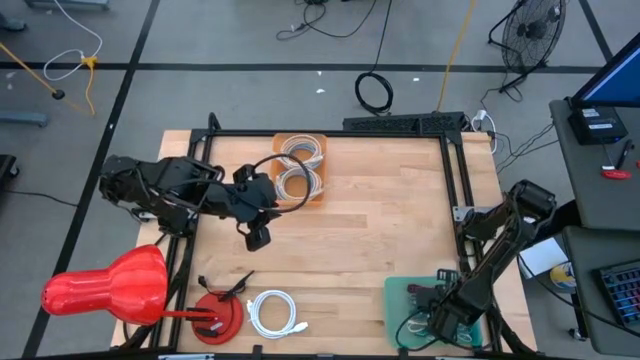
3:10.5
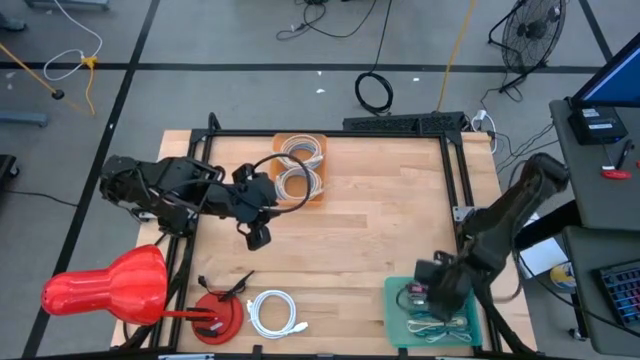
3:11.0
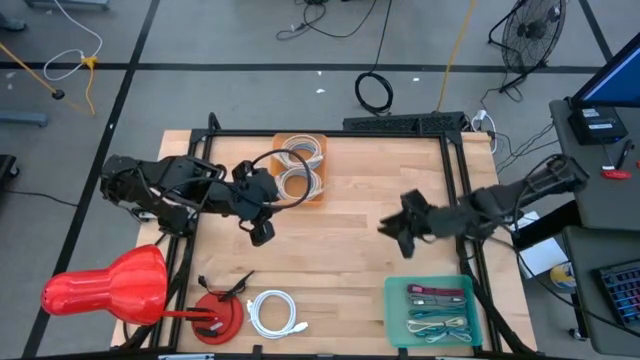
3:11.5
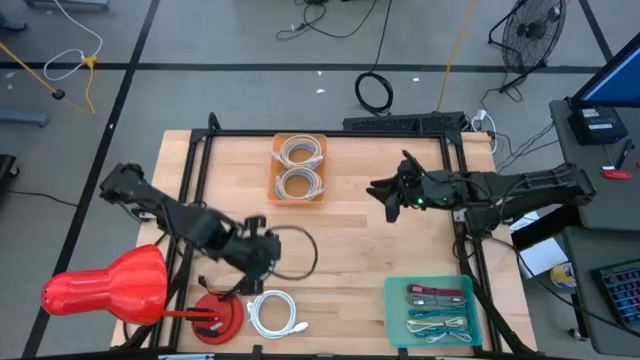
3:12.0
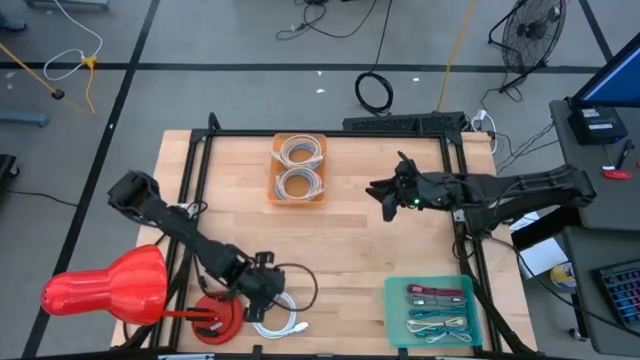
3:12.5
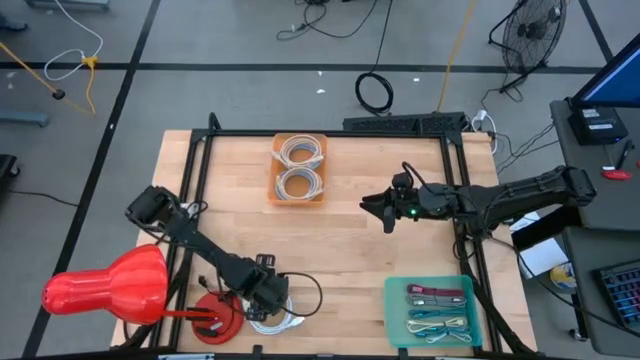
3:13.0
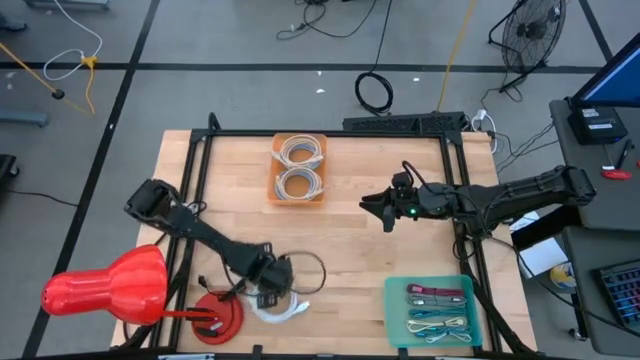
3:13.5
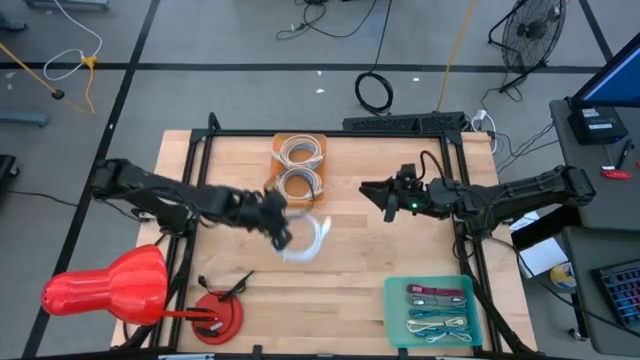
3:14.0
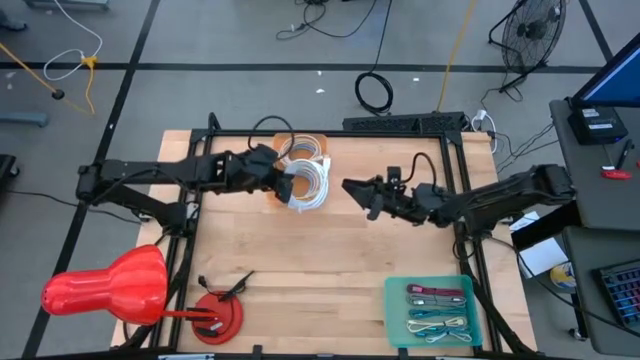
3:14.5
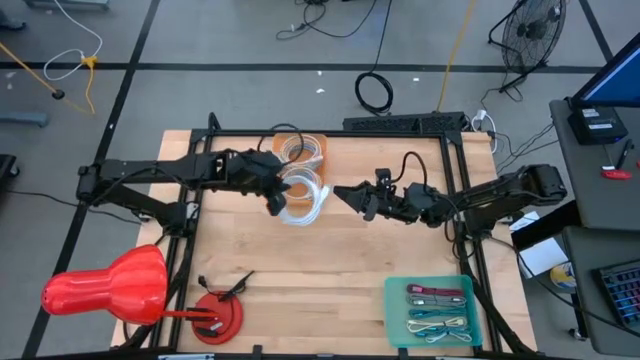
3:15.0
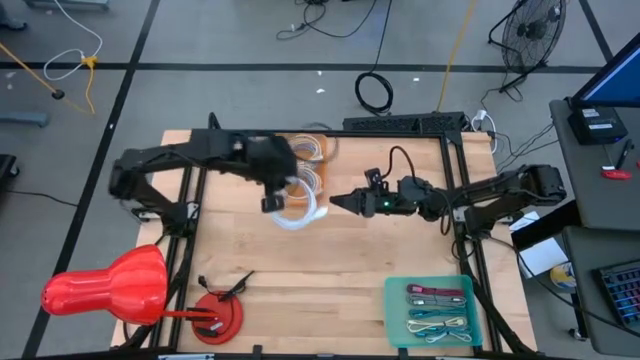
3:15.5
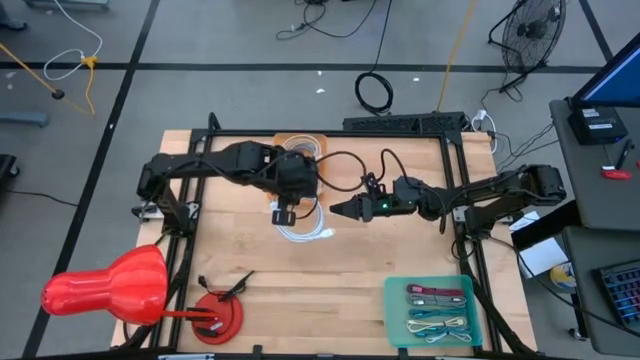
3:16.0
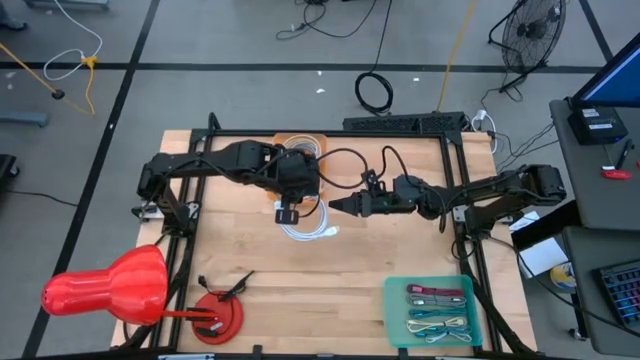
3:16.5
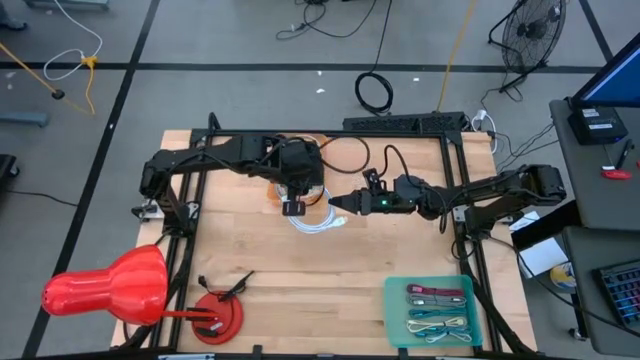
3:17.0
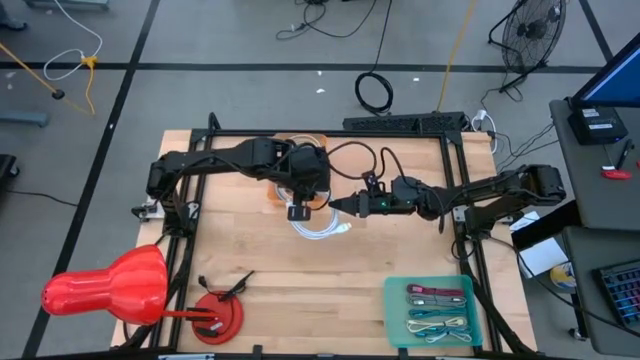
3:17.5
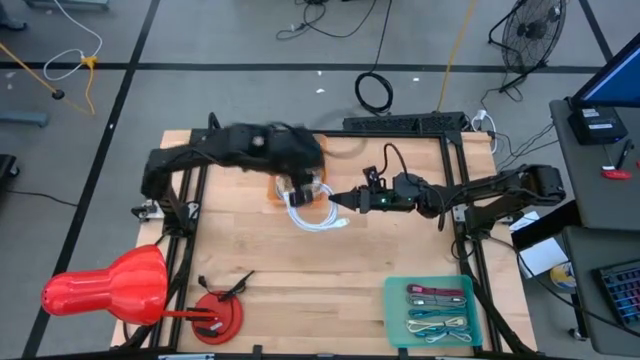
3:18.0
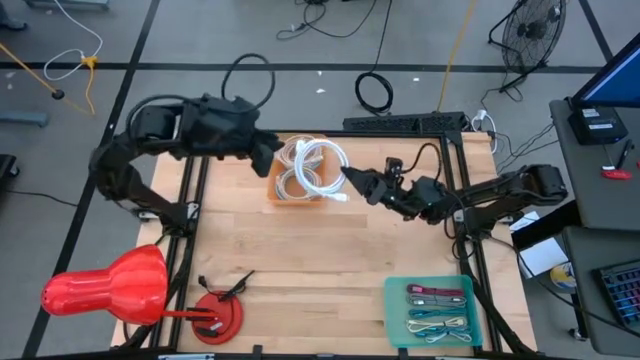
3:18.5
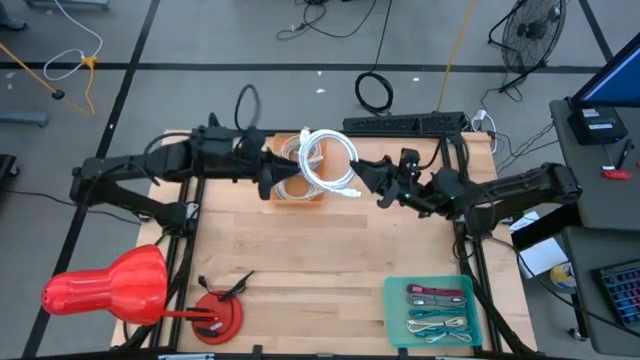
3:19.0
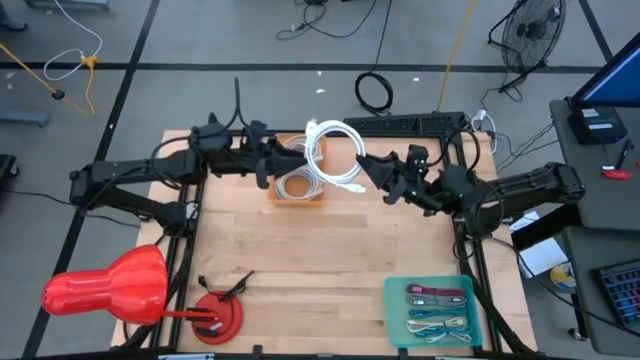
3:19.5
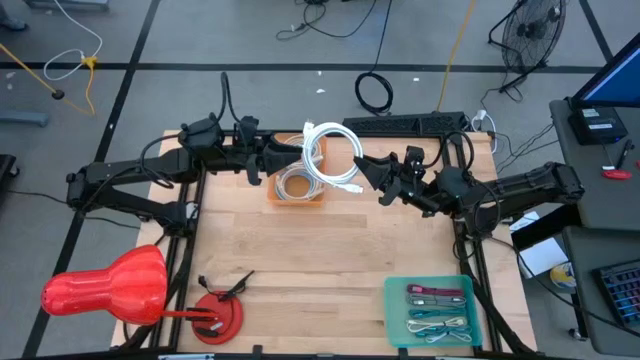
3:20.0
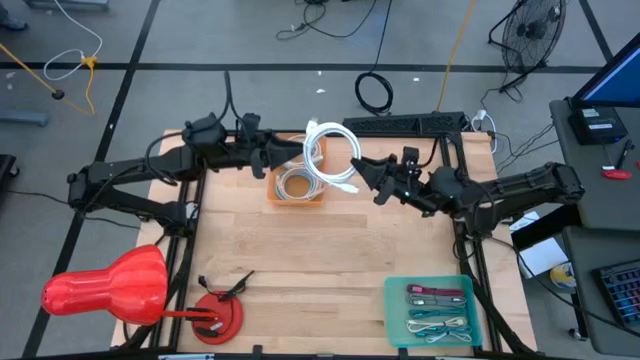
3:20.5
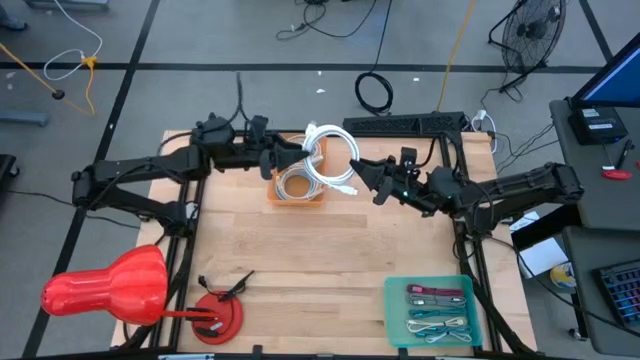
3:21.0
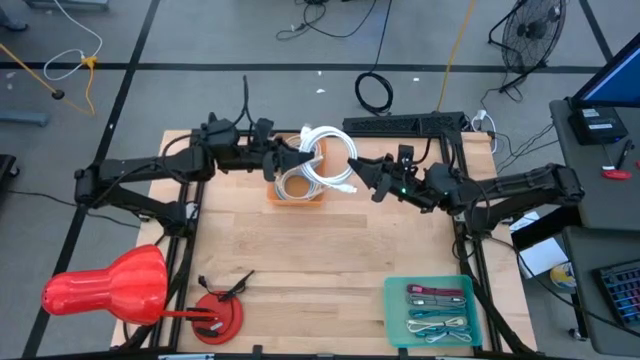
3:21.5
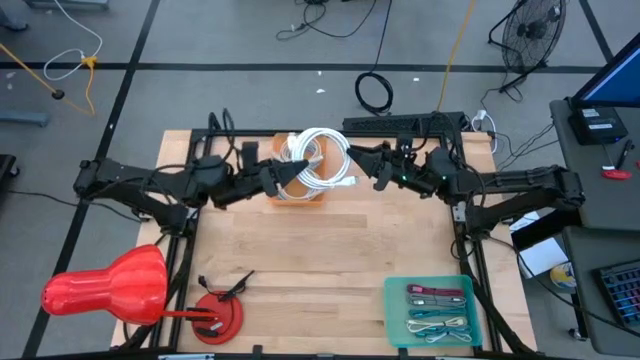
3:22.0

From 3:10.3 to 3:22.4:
Task: Pick & Place USB Port
Put the white usb cable into the orange bin

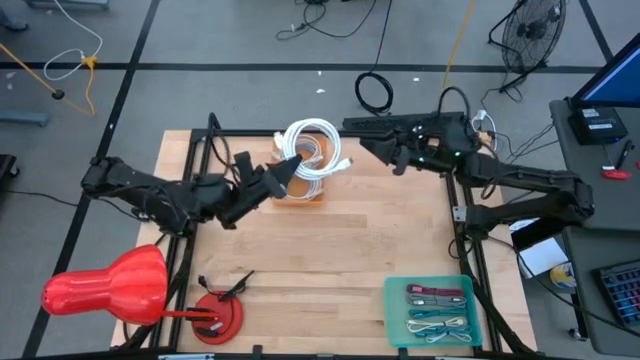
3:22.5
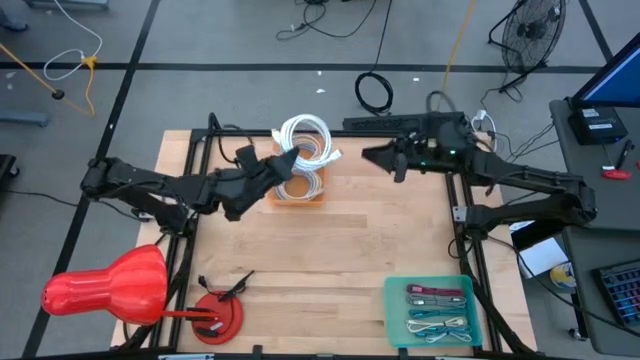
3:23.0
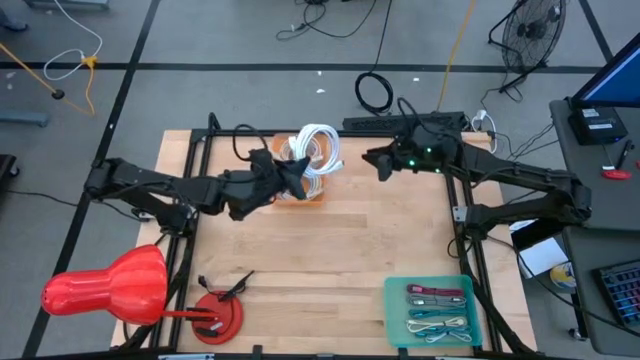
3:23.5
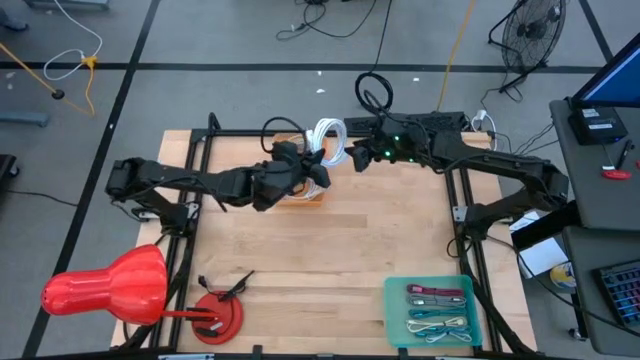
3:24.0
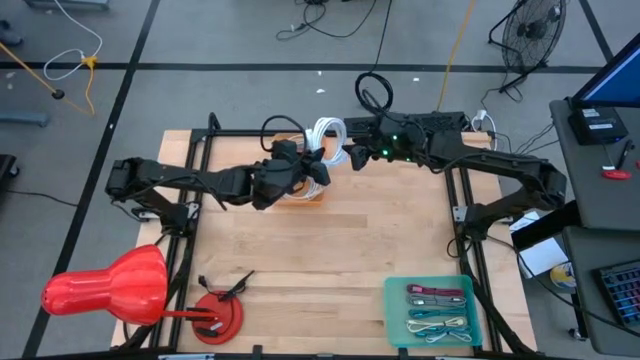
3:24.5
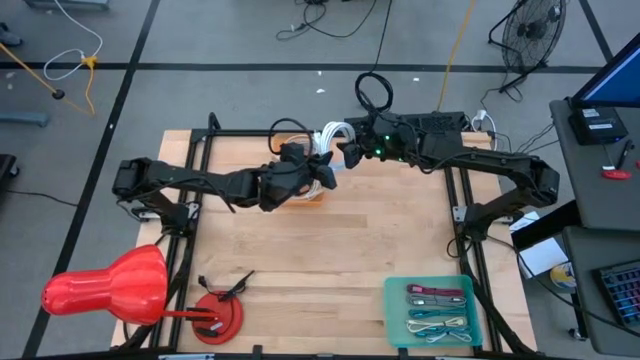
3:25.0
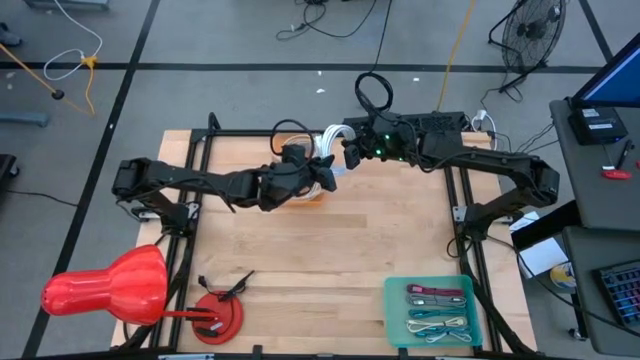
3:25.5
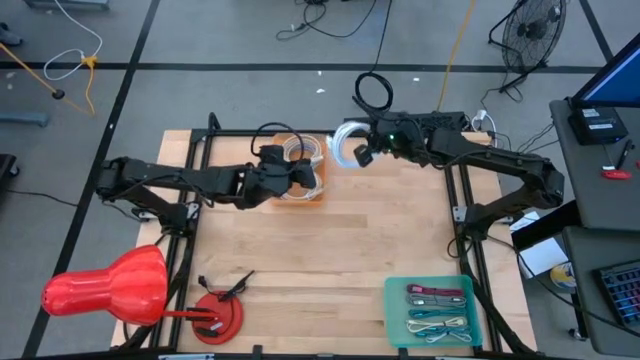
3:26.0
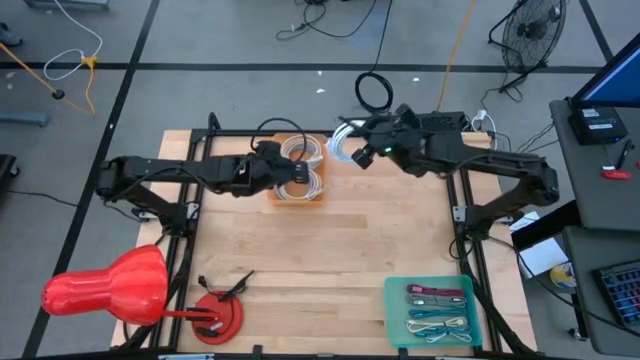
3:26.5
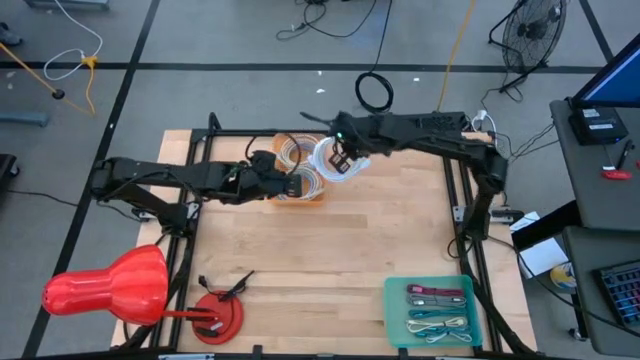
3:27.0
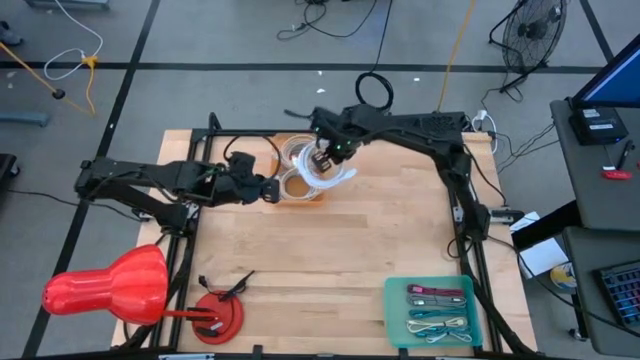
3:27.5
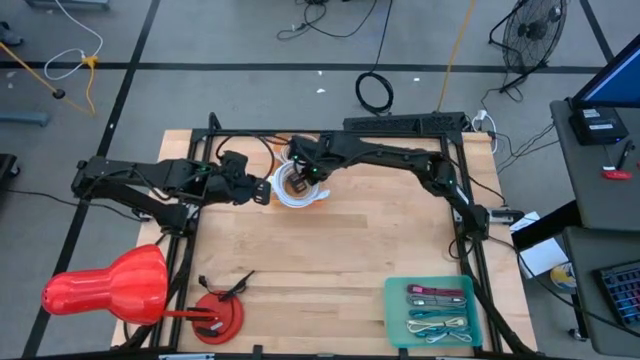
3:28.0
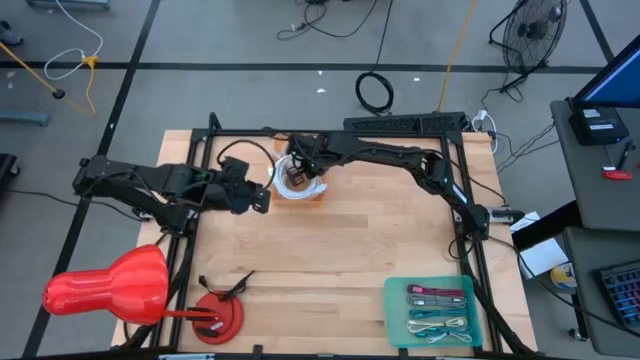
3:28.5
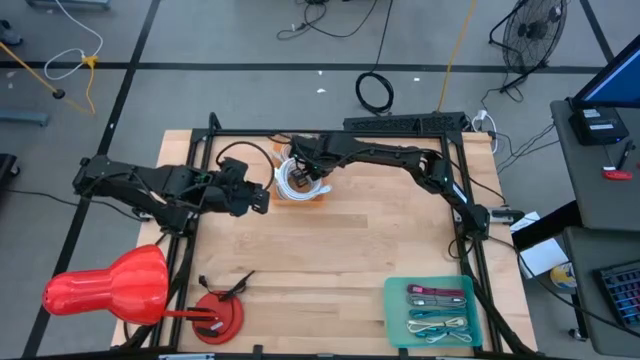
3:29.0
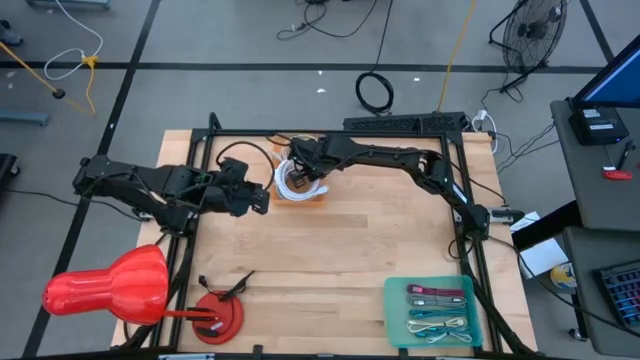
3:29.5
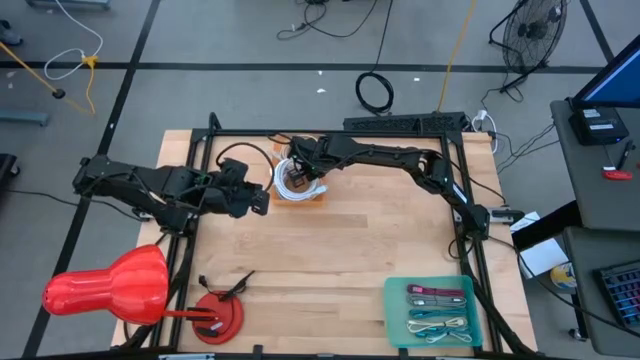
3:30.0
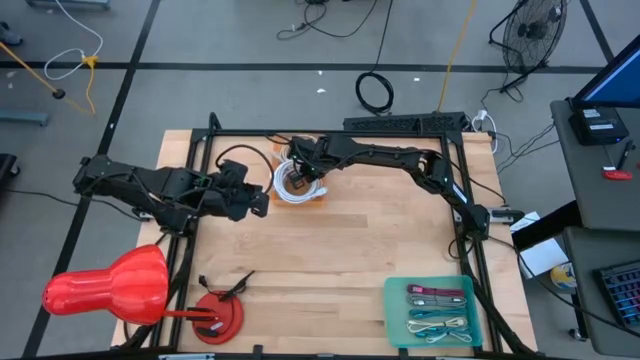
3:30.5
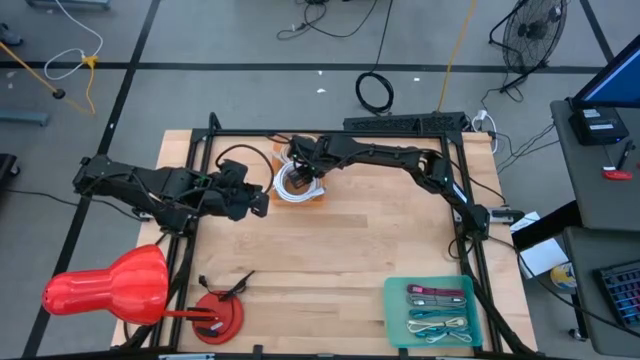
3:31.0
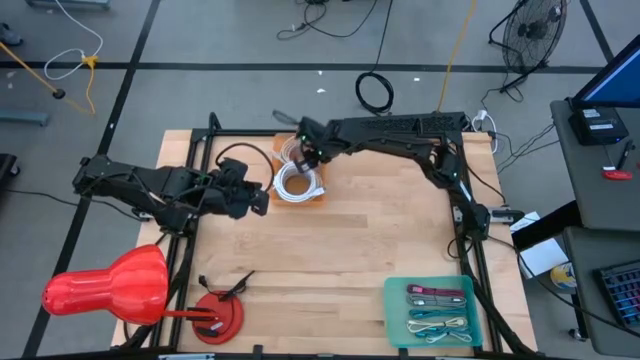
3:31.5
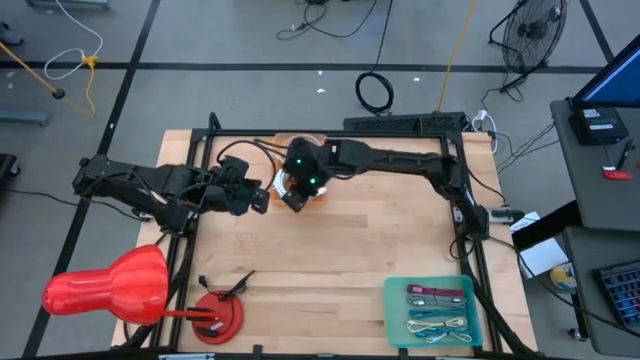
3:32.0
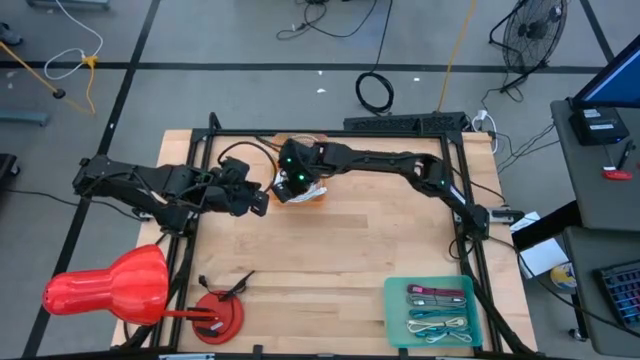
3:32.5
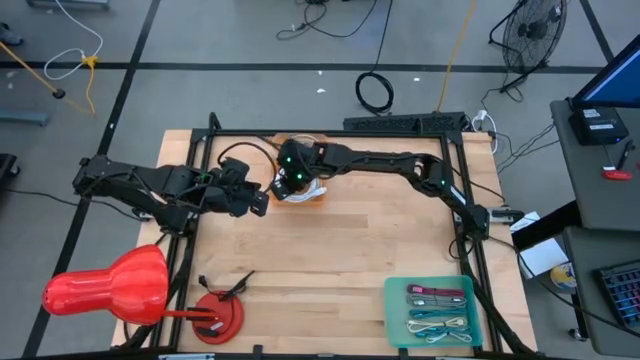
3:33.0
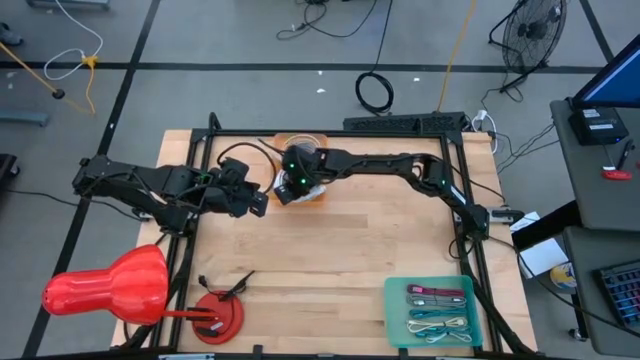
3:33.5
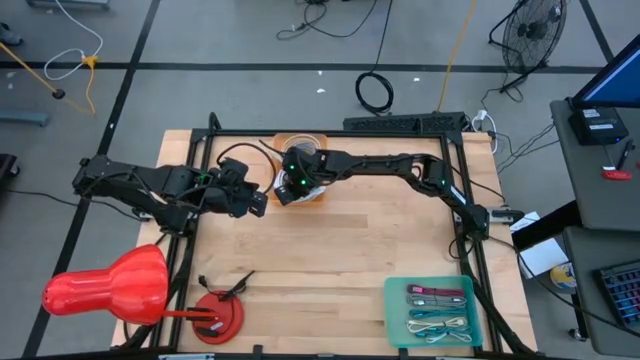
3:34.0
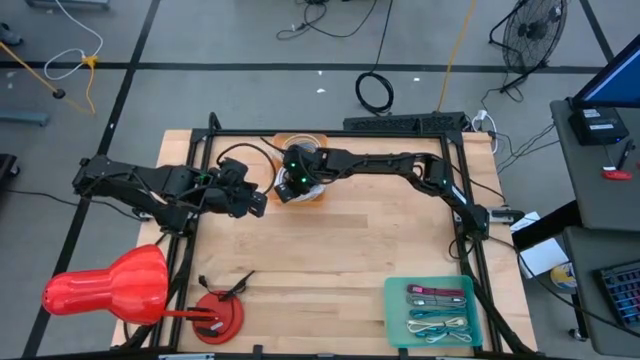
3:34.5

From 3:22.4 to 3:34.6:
Put the white usb cable into the orange bin
